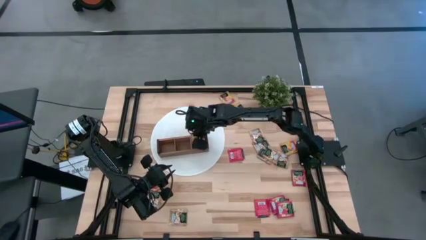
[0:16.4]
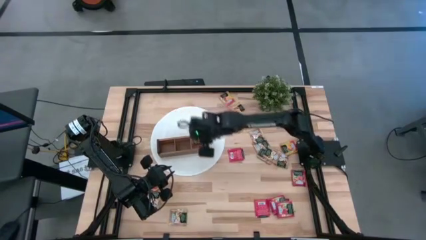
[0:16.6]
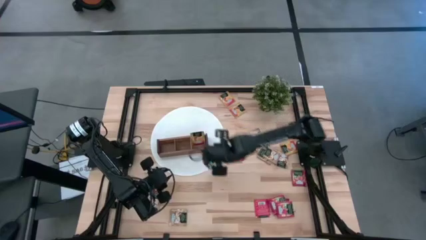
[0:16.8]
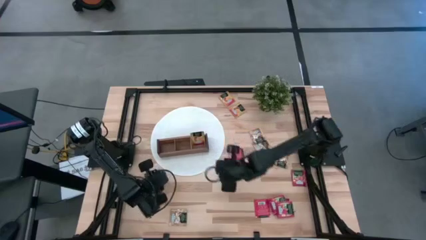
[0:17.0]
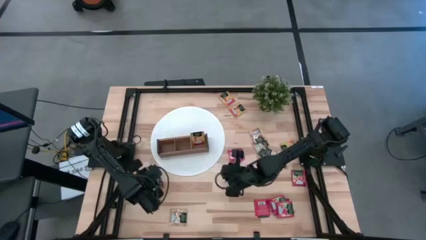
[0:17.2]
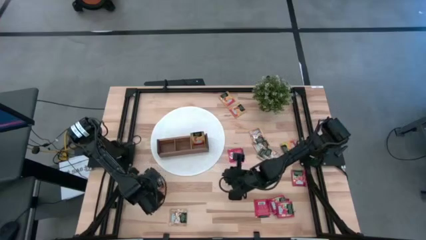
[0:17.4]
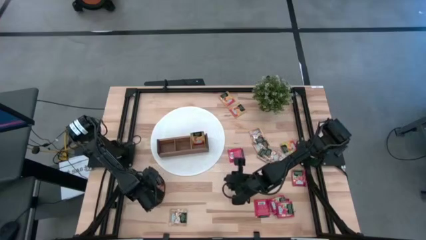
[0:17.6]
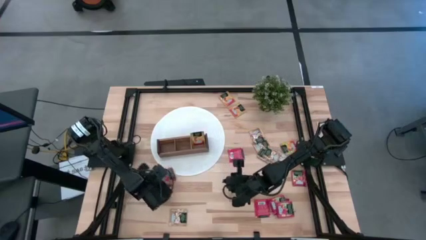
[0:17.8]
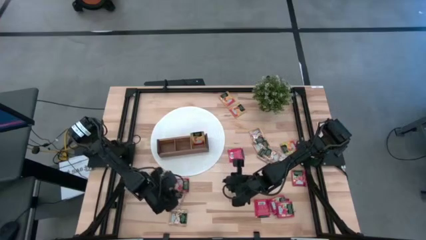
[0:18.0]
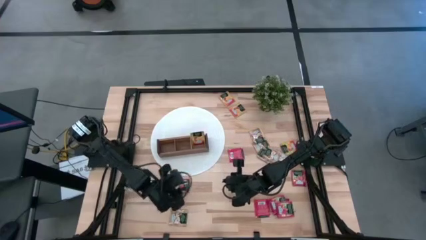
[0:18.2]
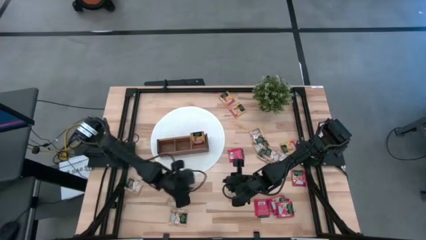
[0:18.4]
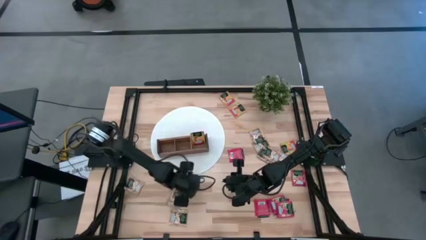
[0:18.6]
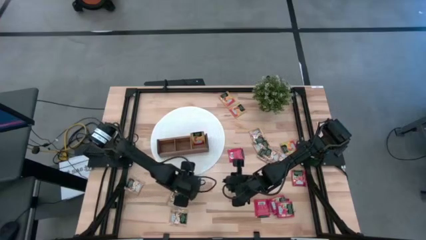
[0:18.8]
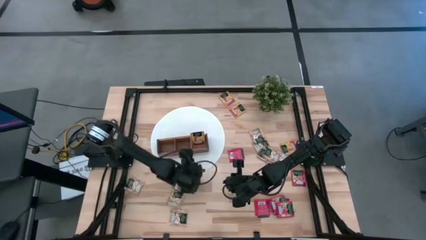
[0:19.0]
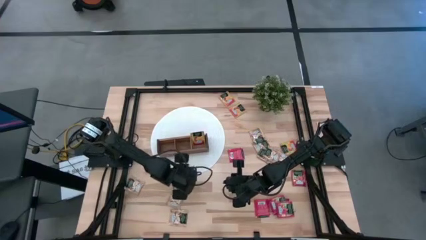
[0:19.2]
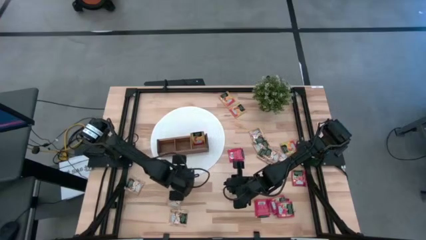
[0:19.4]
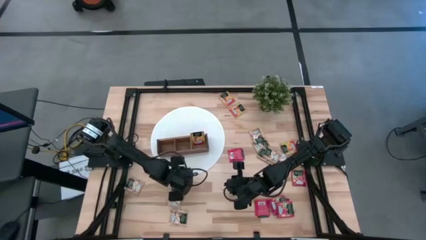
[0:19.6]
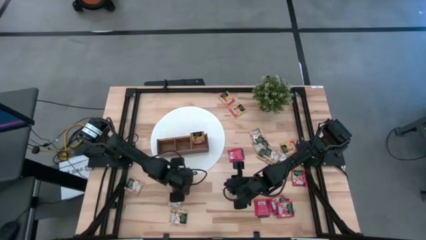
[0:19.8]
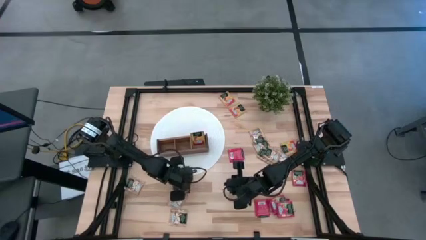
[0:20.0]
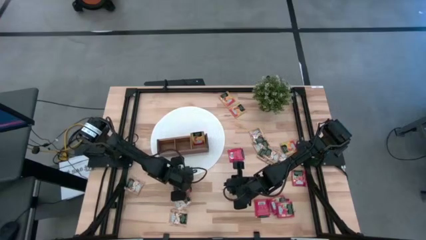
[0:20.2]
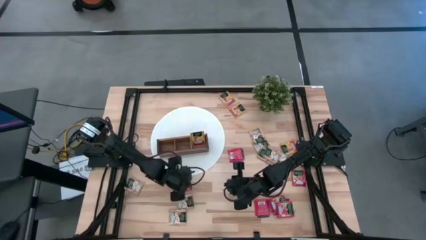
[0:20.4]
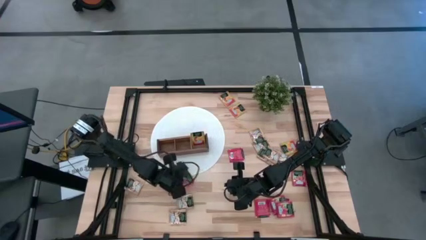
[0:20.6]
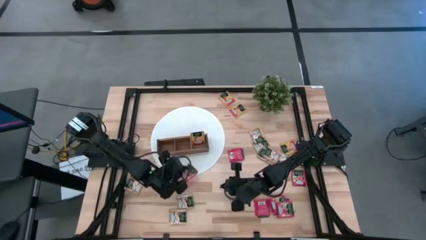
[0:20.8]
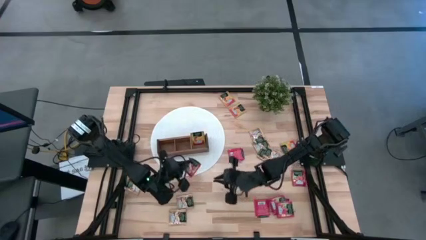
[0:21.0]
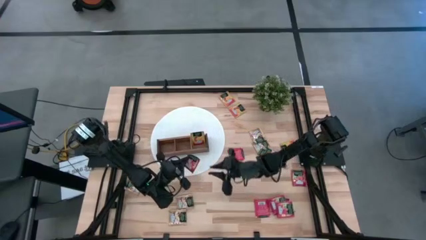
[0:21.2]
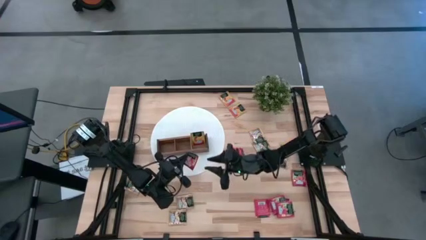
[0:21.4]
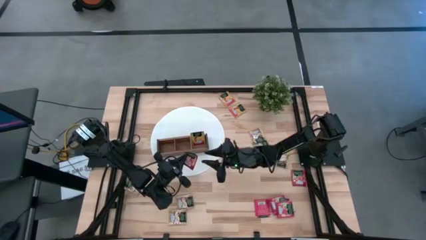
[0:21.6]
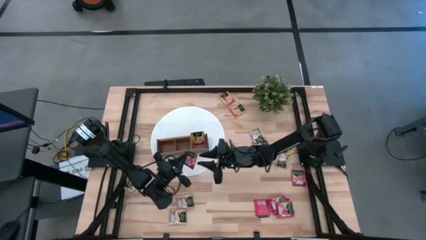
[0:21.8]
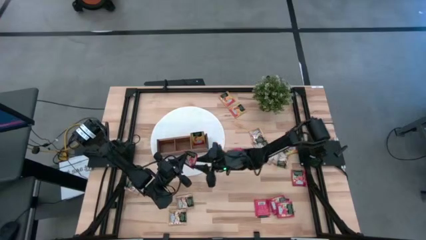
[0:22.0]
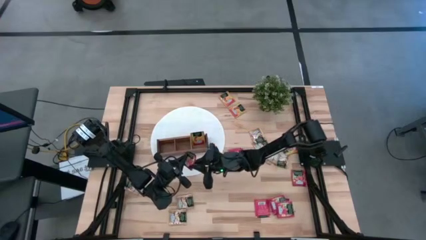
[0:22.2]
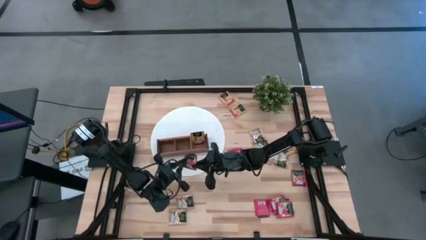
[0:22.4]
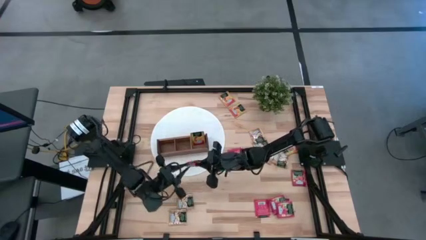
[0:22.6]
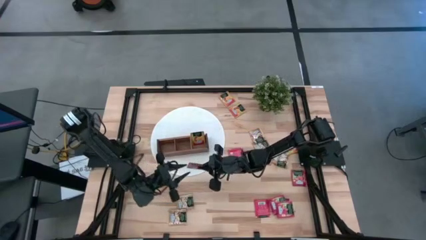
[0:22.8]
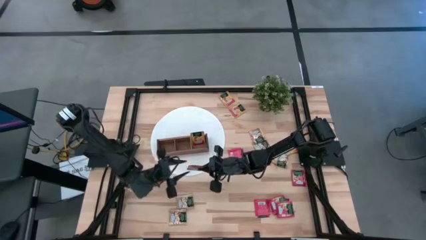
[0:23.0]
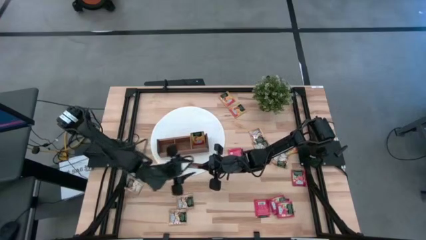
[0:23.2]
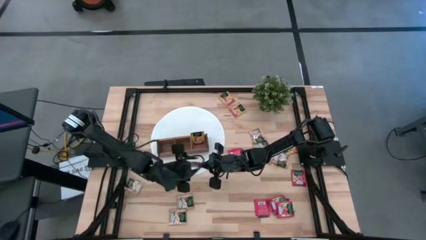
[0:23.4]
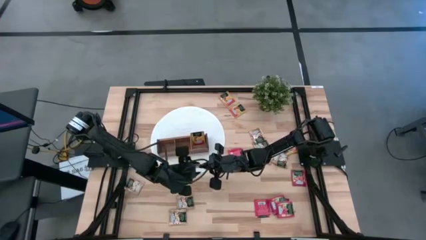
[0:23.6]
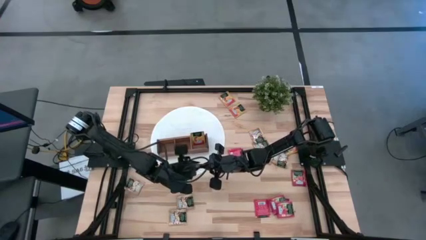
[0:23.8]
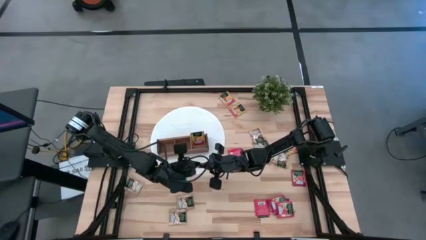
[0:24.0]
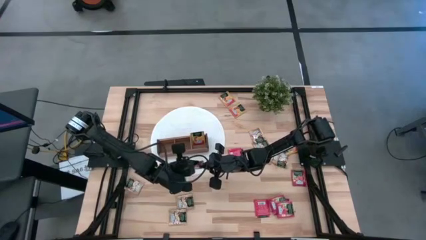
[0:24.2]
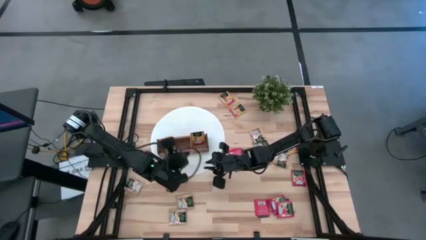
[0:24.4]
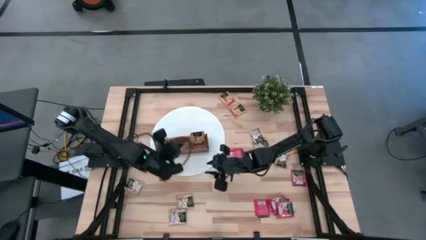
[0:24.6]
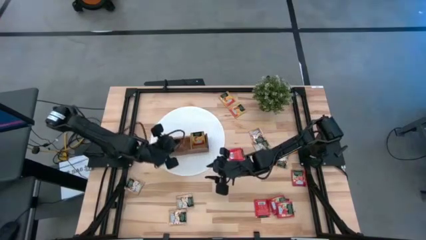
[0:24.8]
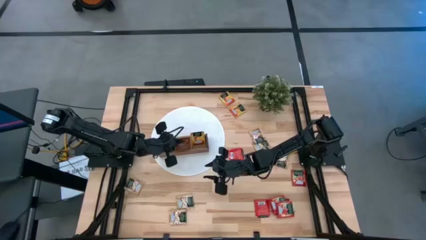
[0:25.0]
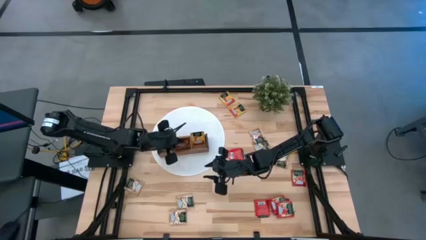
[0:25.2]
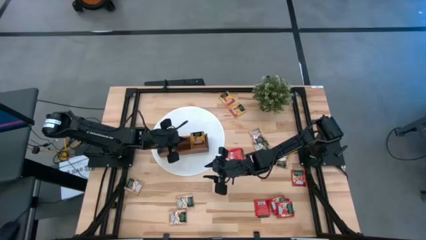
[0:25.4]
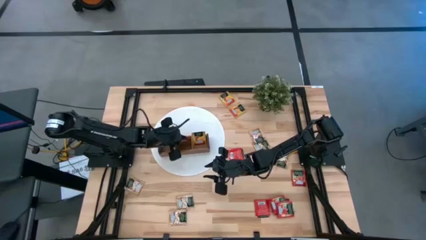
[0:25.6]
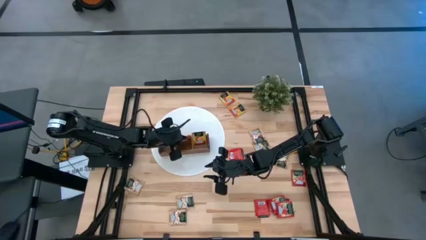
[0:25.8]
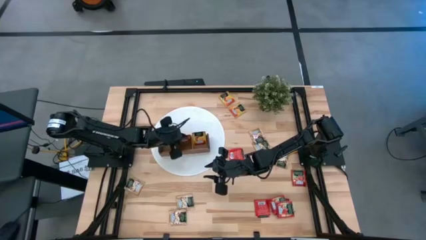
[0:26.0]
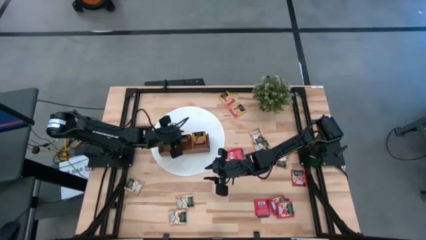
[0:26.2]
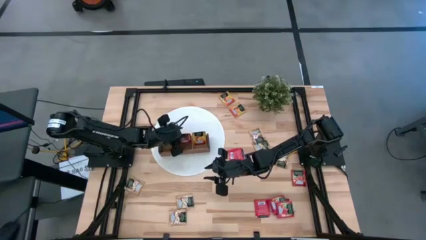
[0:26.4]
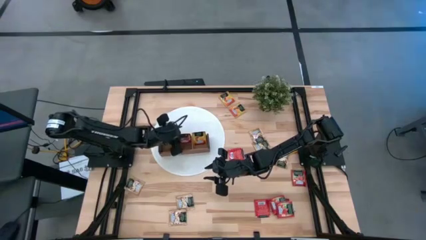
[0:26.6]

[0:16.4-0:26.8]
Task: Pick & Place Tea
Put the red tea bag into the middle section of the wooden organizer

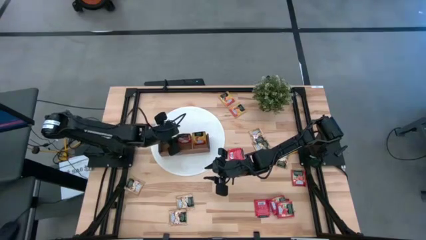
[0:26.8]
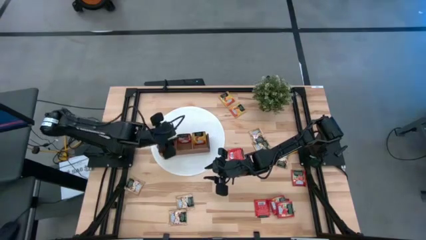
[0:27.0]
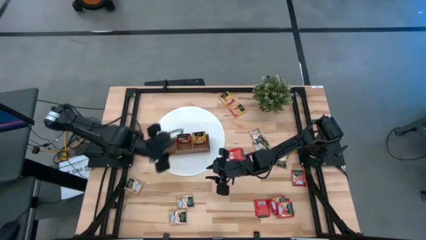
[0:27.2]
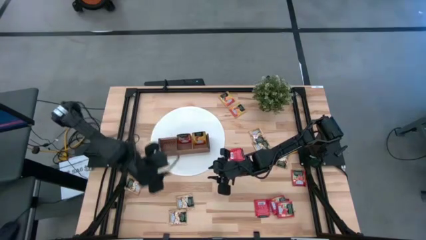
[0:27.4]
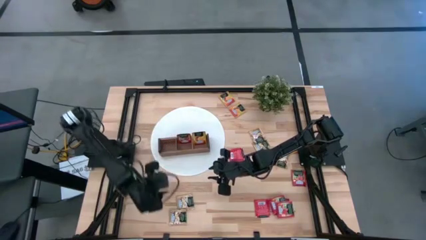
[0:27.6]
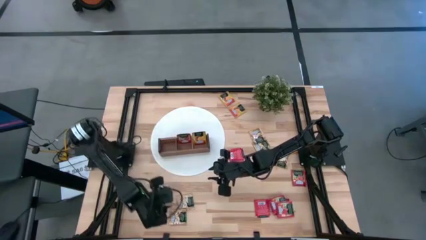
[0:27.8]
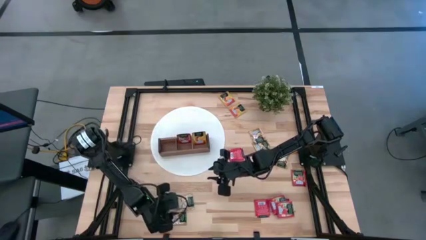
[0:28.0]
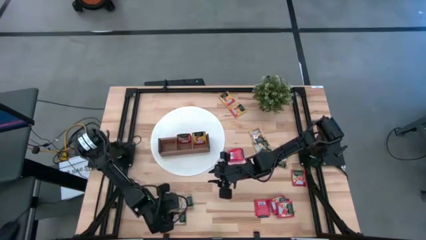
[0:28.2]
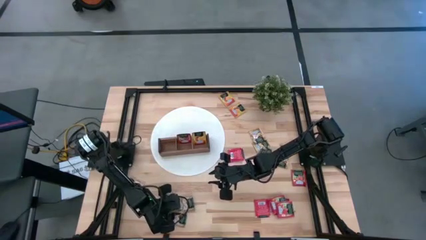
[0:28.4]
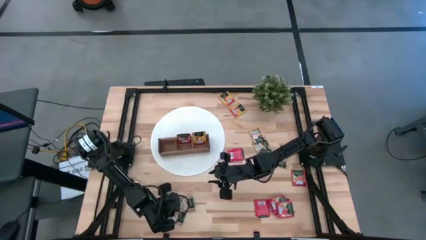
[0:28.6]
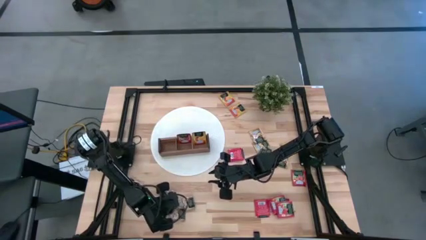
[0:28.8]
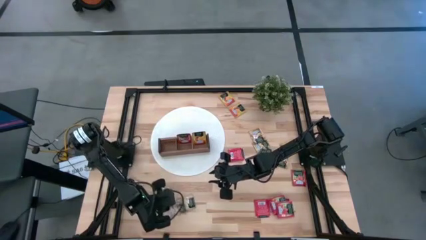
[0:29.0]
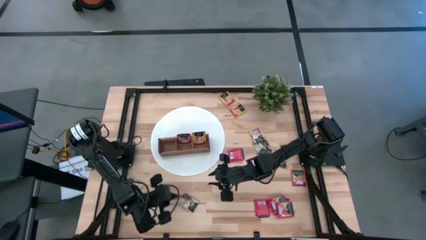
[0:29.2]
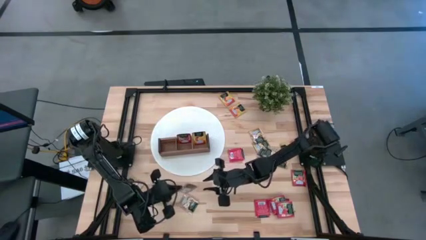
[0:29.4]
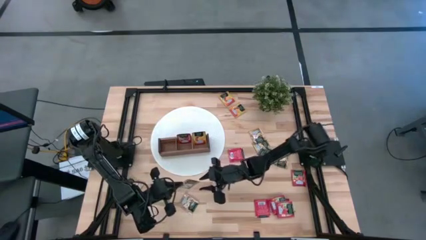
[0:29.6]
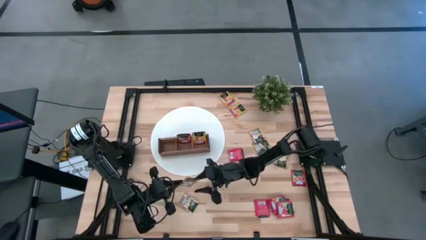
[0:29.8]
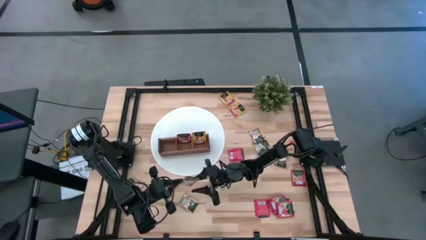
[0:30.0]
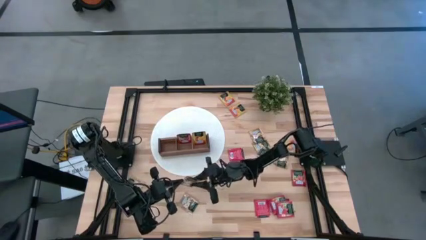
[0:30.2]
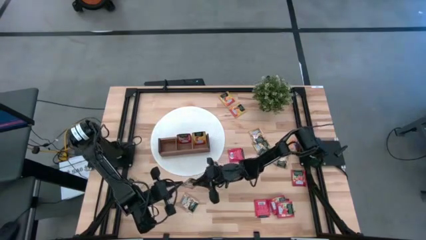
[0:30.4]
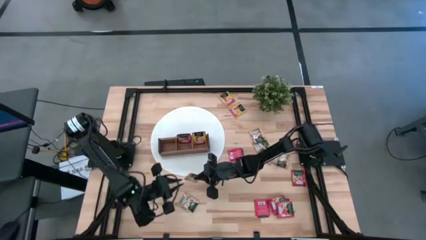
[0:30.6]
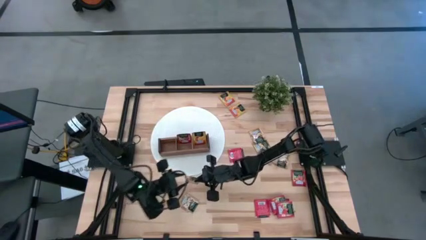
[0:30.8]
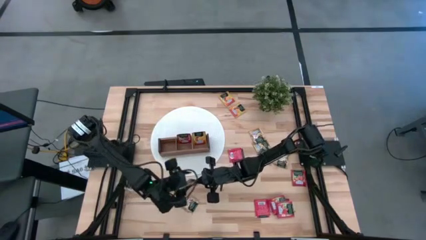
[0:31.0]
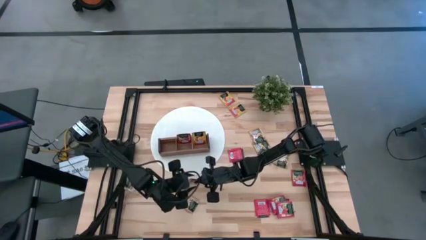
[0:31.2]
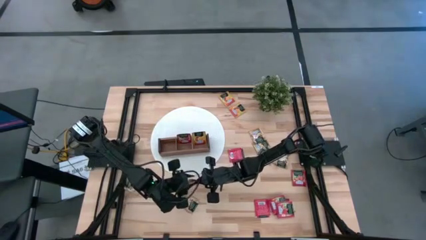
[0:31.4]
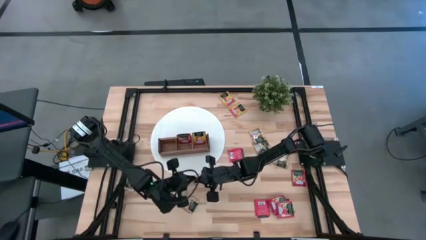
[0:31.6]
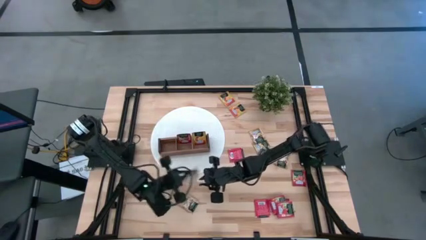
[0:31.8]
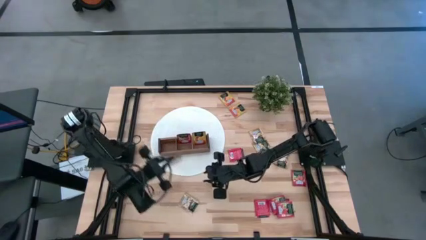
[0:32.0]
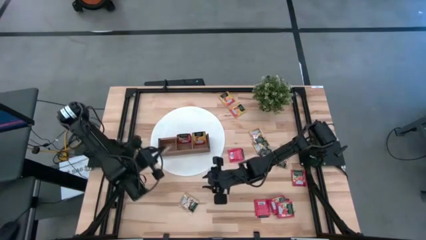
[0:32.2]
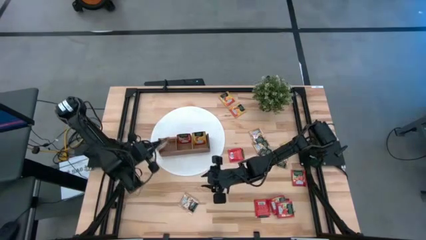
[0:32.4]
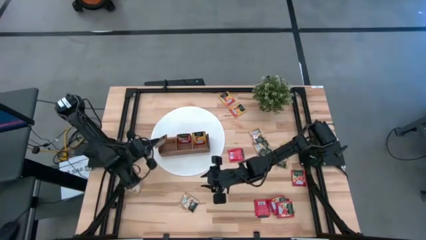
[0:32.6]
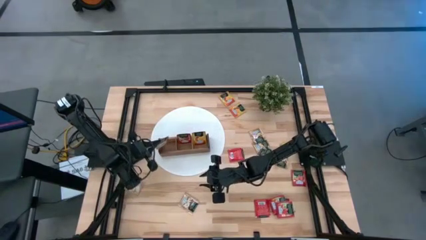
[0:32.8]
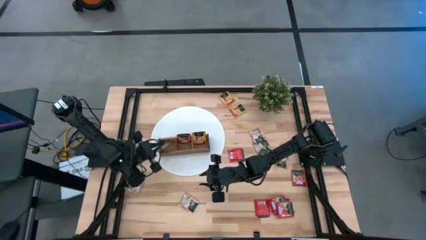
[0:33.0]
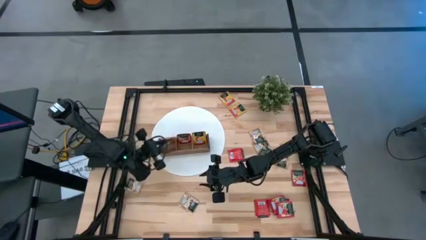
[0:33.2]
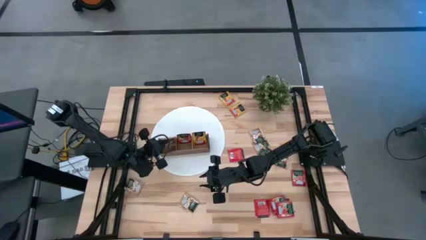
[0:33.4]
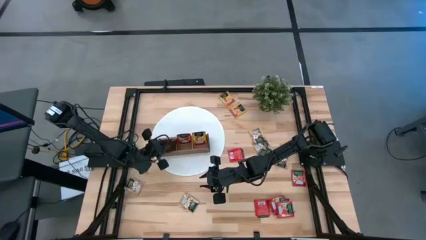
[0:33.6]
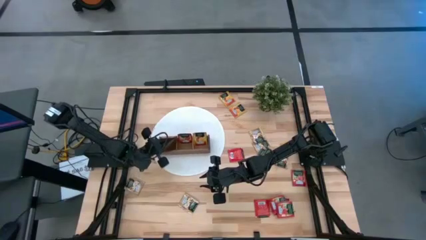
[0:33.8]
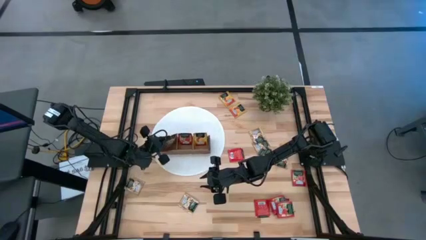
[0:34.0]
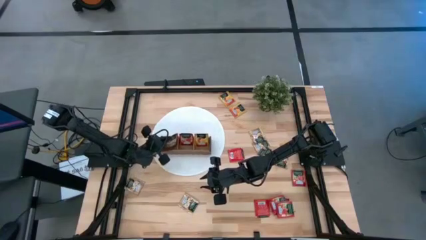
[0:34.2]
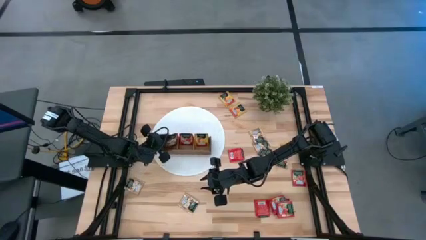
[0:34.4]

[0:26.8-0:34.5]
Put the brown tea bag into the left section of the wooden organizer
